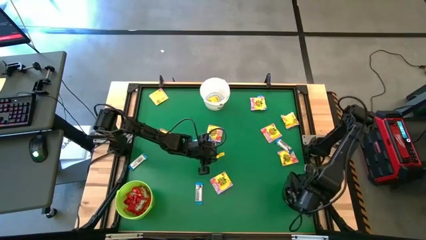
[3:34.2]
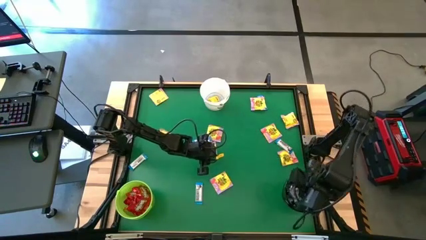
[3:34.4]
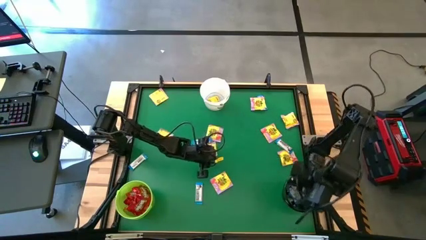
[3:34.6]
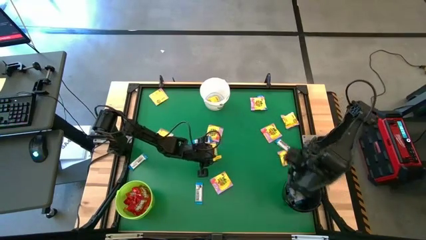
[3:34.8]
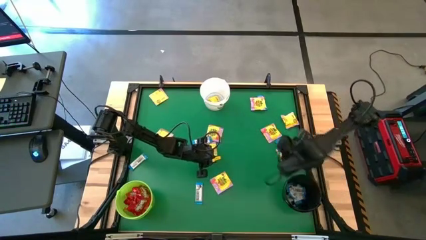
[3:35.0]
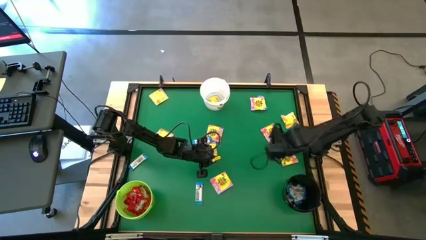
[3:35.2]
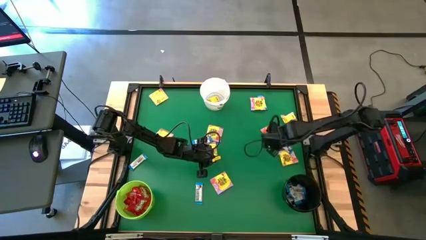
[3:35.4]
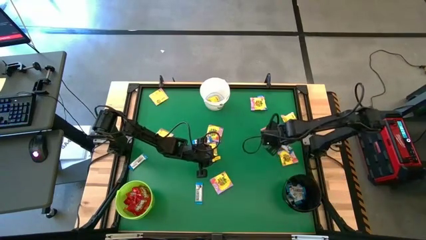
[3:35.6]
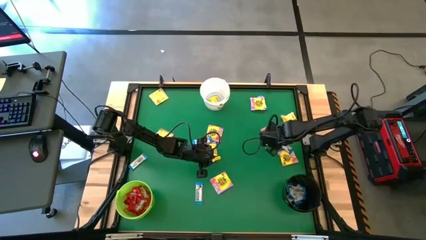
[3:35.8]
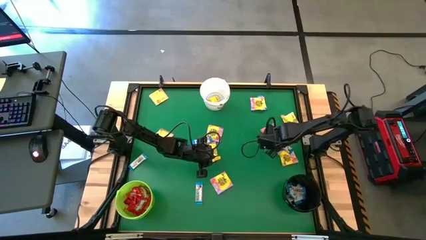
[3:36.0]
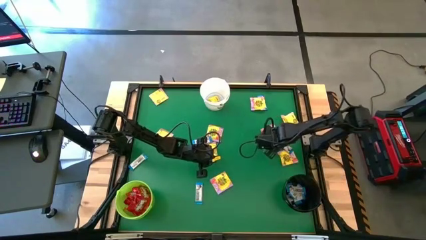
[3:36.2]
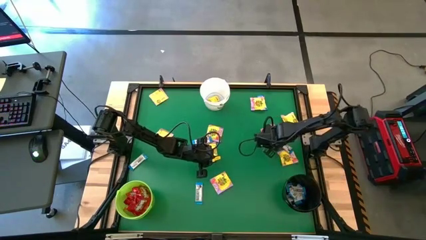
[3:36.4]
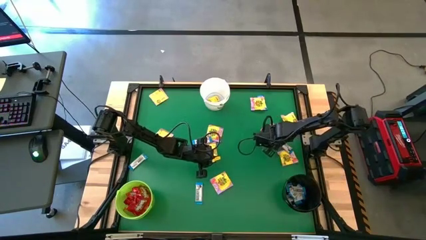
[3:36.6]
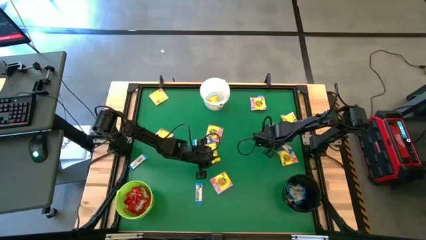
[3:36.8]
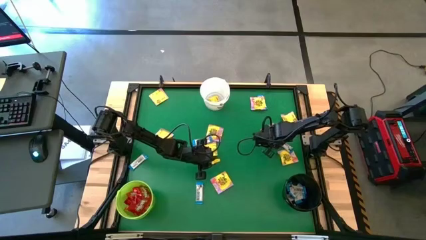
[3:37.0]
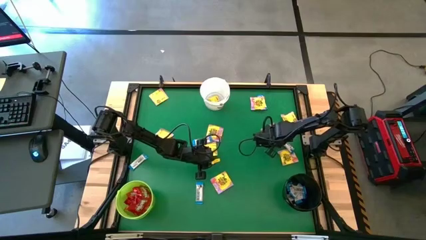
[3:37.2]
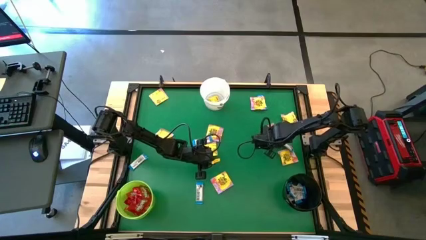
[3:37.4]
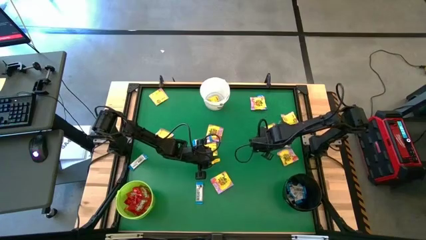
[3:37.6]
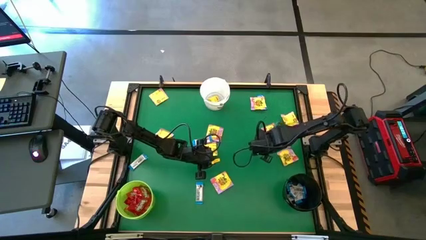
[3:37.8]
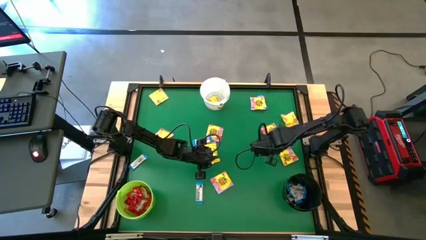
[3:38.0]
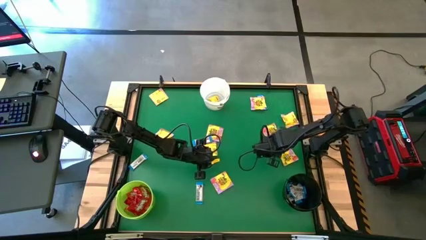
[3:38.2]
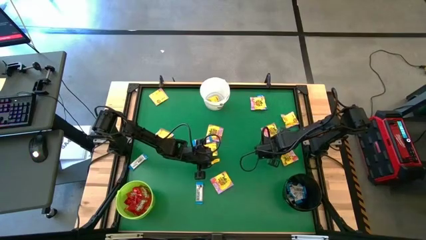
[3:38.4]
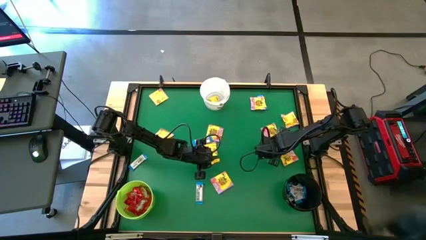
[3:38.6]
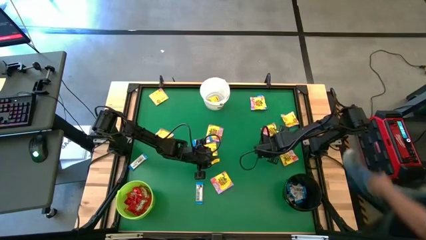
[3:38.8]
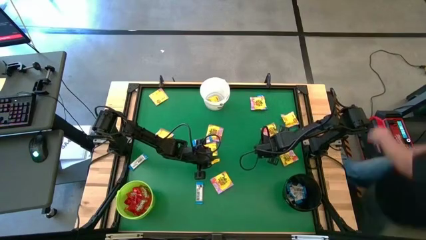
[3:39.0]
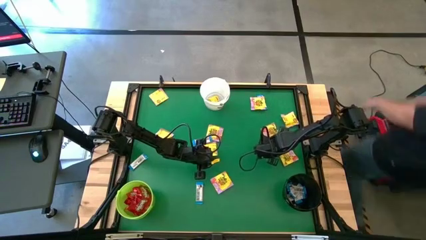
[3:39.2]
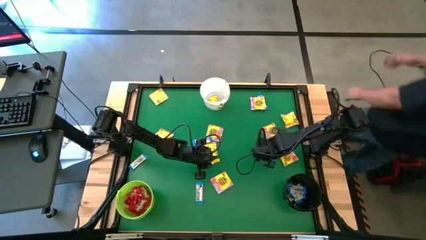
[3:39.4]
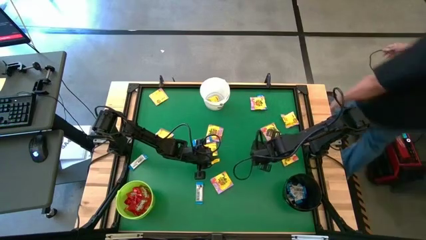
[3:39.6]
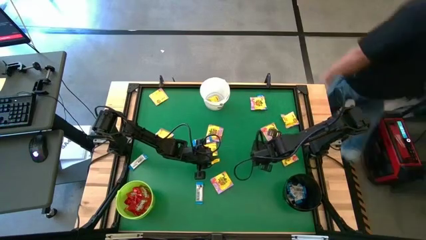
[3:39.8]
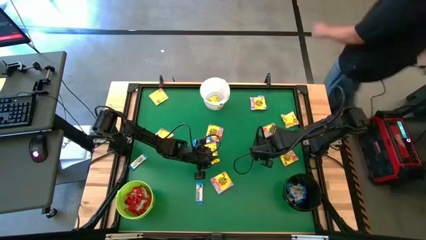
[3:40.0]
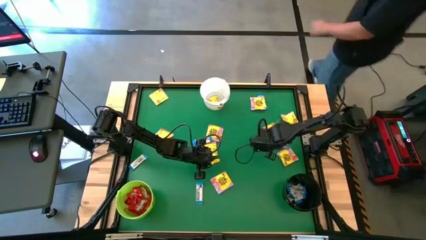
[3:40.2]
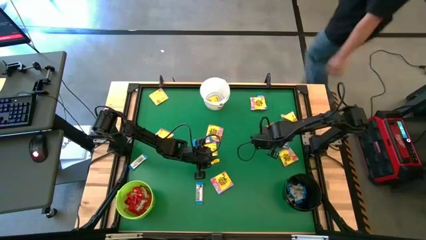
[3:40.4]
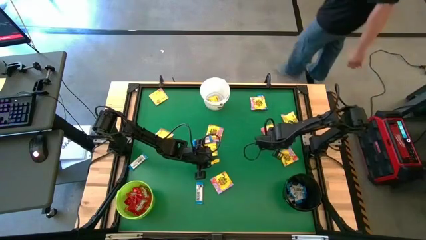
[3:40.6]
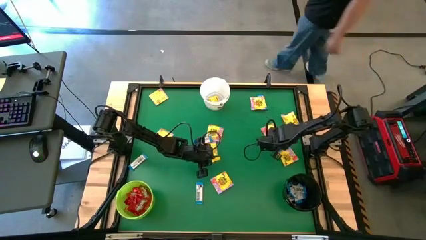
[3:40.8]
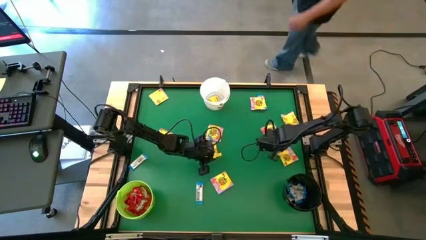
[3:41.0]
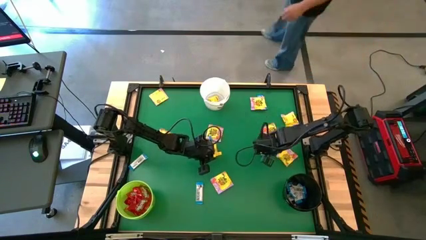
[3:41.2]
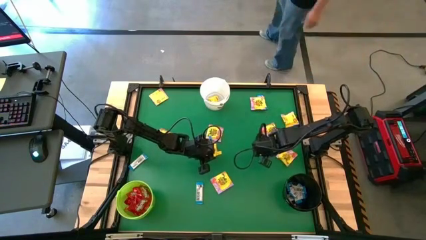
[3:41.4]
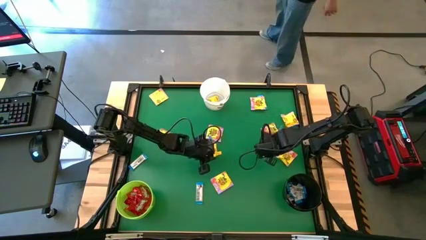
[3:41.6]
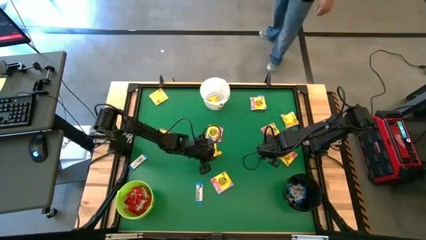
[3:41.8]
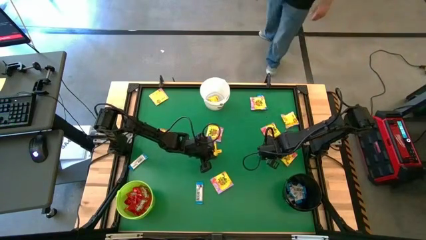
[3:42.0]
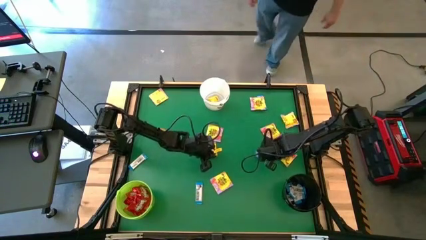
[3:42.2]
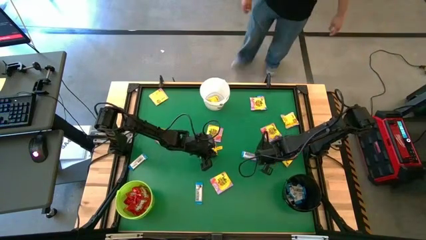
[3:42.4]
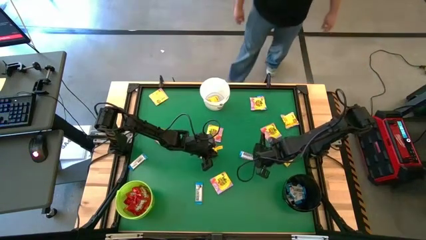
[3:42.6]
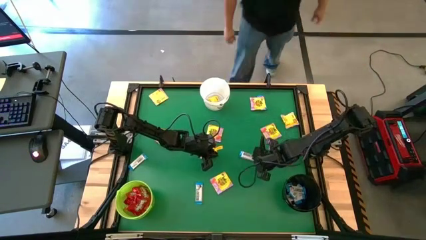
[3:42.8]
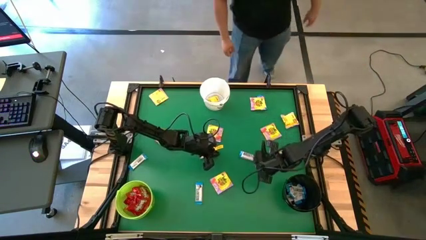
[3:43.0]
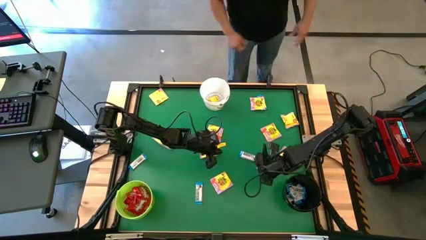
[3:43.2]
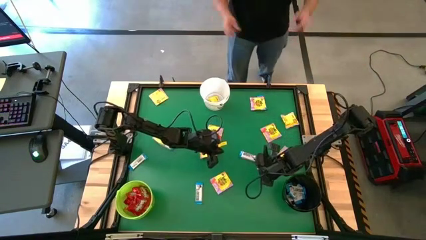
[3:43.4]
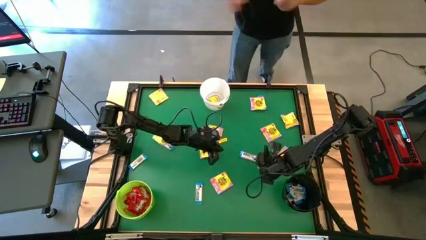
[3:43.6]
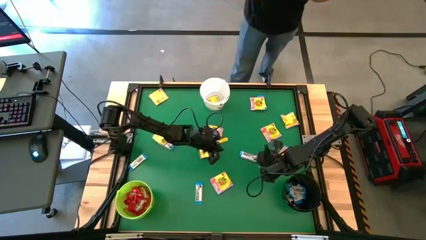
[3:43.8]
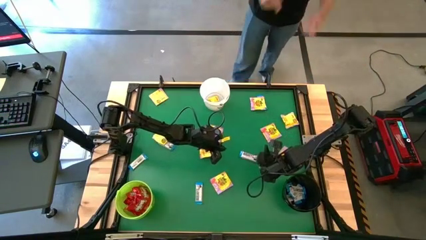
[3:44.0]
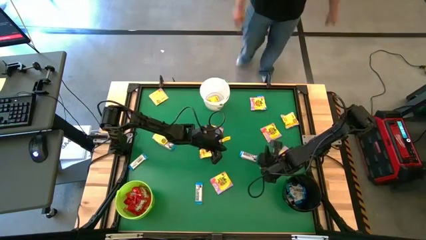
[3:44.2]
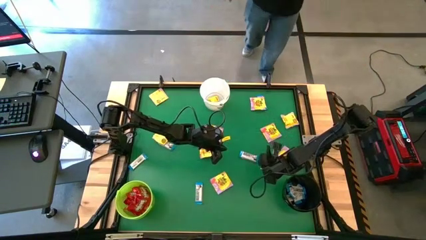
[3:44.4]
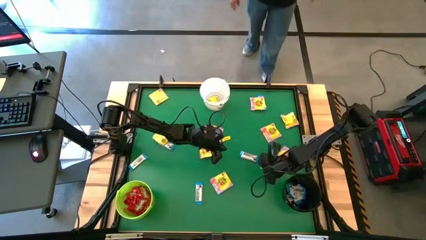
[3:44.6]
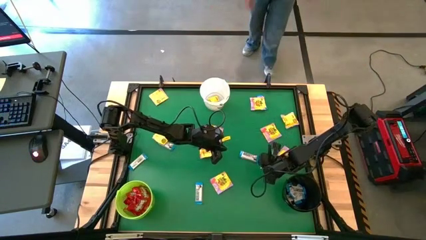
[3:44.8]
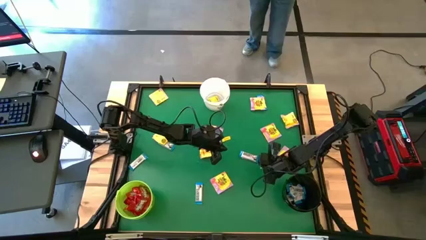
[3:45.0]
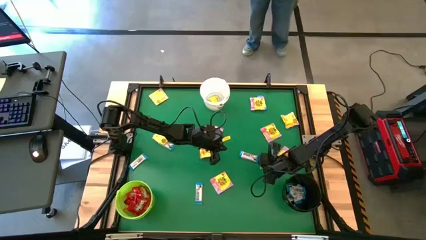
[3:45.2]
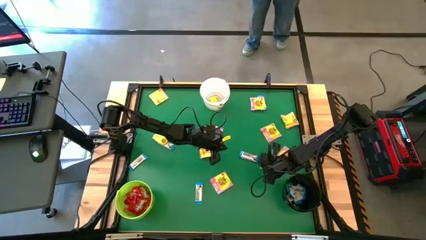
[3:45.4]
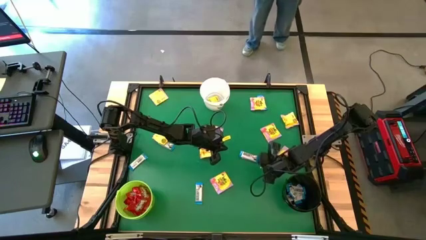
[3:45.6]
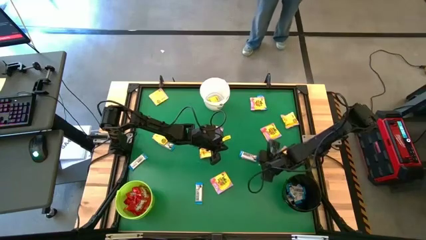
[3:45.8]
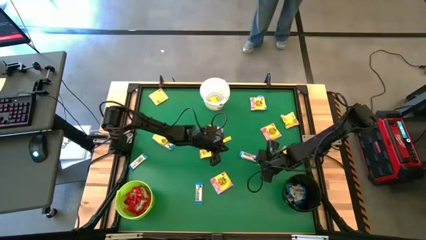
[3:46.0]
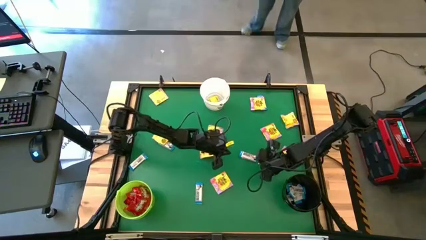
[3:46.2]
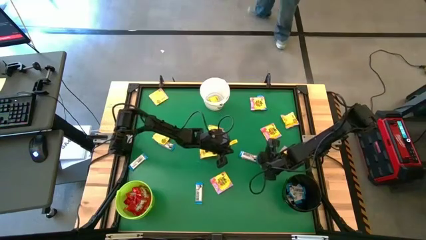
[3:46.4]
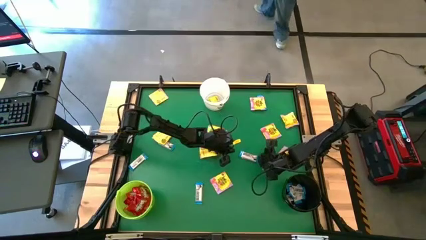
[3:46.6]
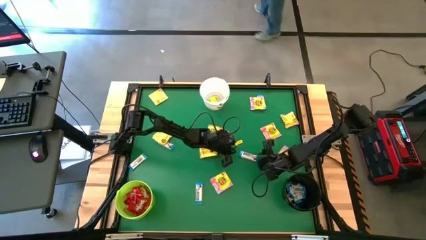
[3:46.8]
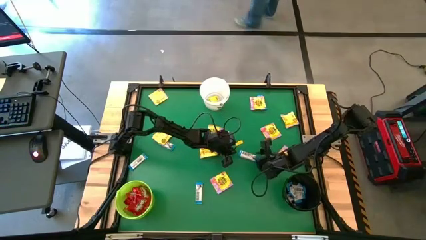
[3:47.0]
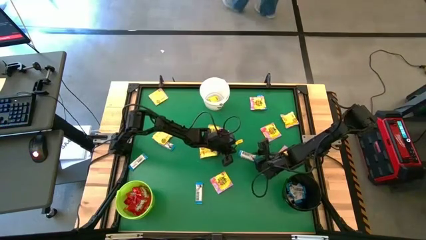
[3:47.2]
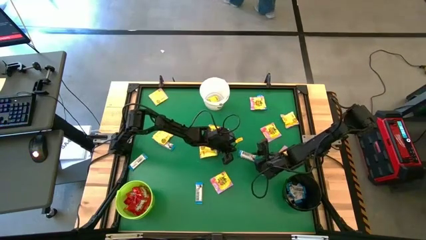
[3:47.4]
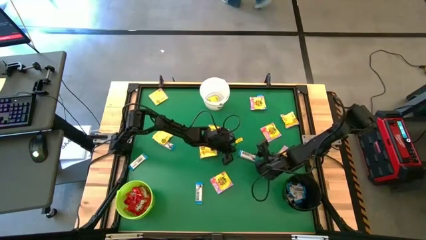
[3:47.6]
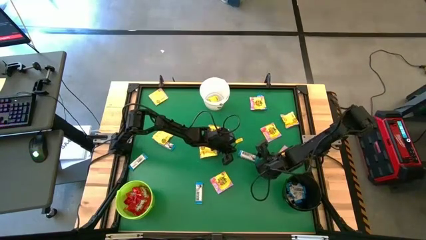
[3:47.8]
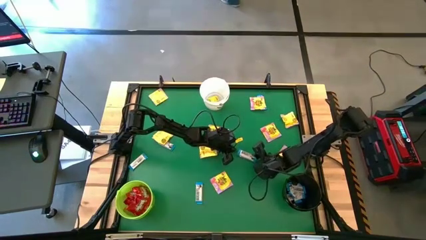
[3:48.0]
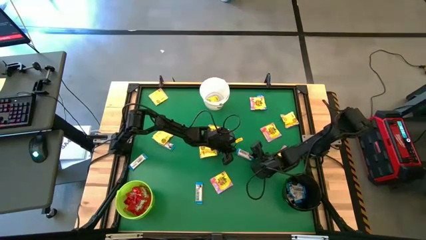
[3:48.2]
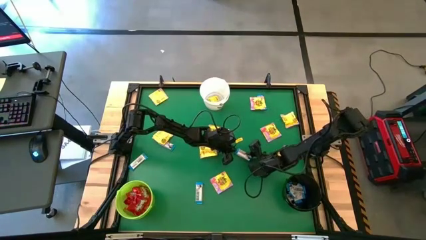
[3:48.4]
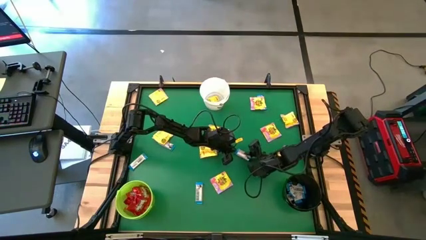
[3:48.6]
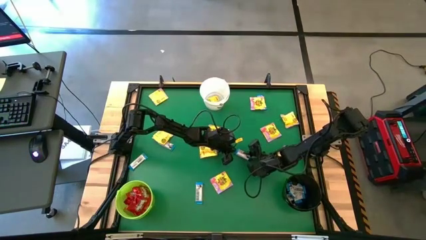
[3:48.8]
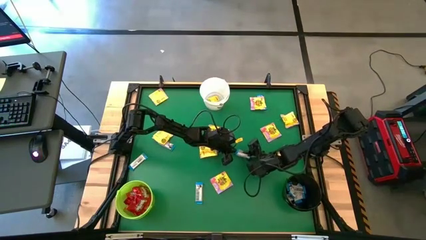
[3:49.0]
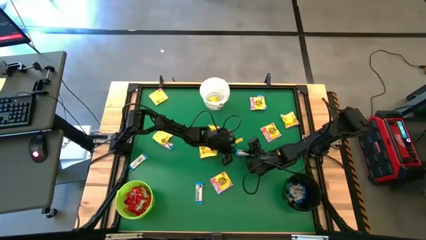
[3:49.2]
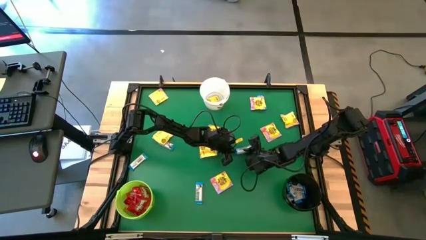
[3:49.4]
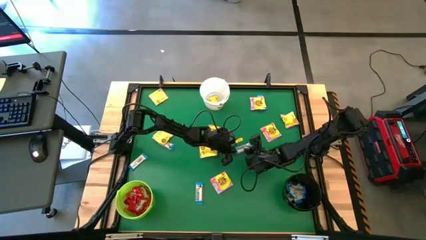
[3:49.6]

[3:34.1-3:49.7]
Task: Sort candy by brand, put in halloween buckets
Put the white candy into the black bucket

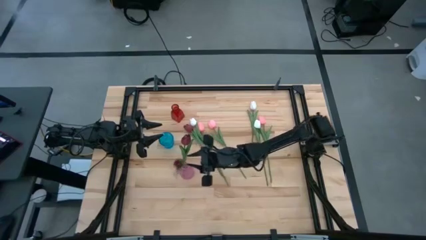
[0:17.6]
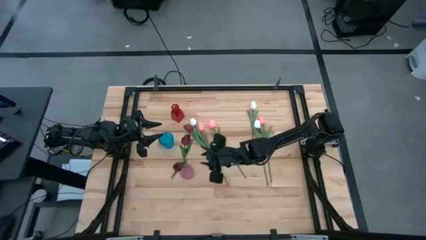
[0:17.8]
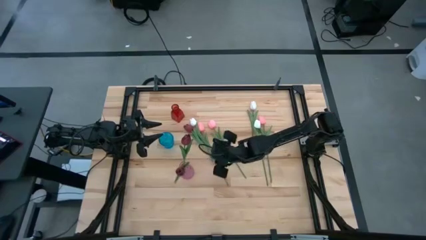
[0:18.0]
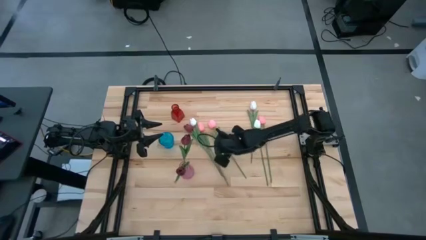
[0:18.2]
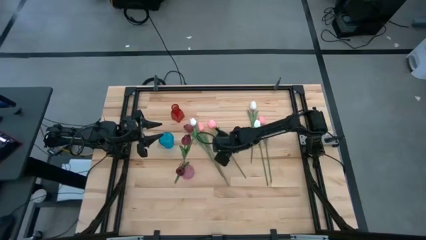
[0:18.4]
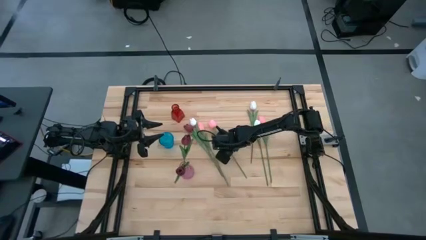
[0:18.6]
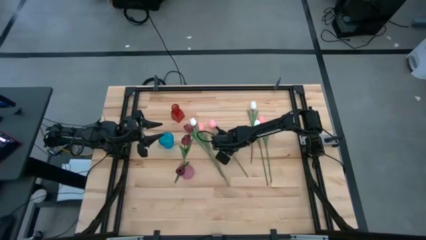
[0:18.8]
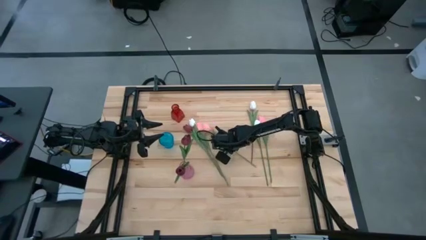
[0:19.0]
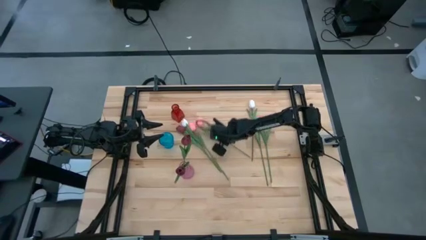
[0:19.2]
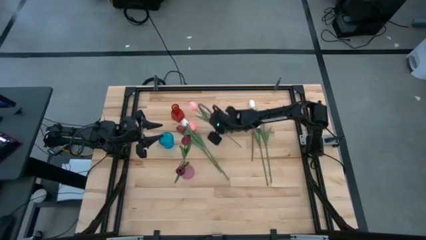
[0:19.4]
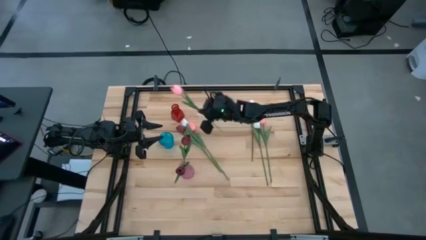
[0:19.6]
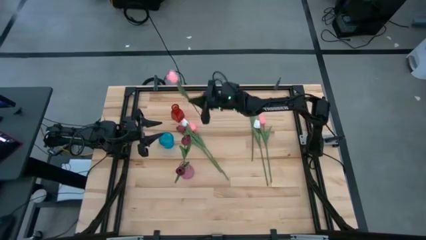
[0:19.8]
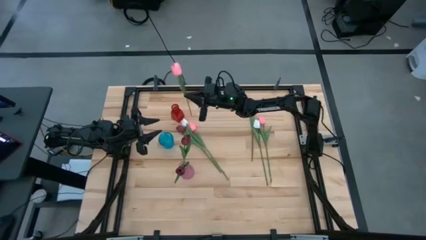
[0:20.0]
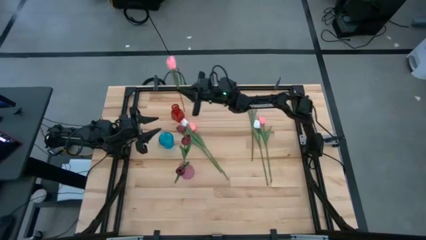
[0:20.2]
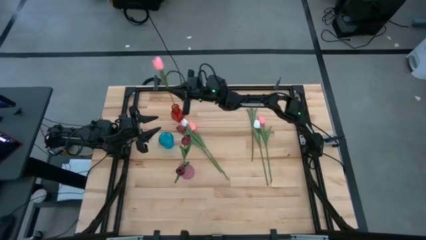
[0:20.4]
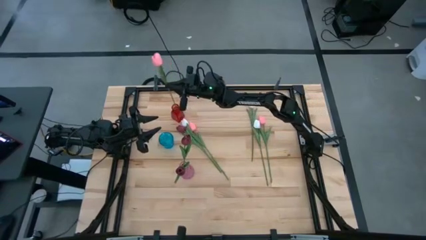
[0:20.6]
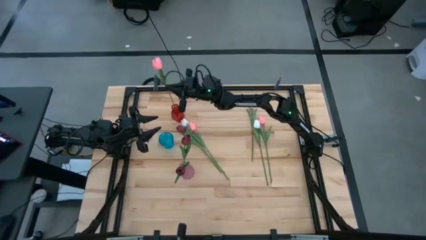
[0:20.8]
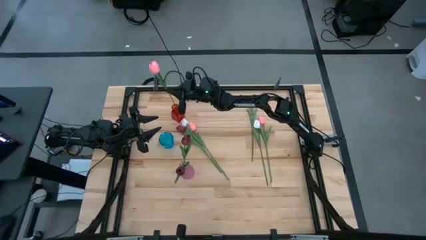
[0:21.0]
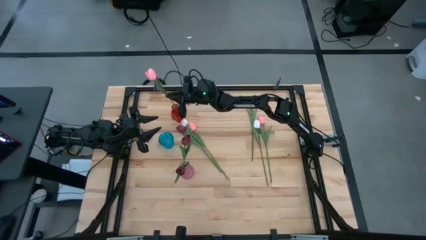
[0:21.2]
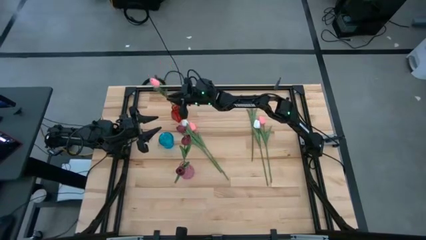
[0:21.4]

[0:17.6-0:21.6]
Task: Sort flowers into vase by color
Put the middle pink tulip into the red vase
